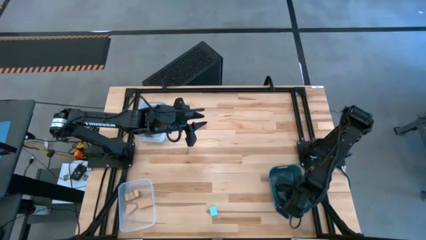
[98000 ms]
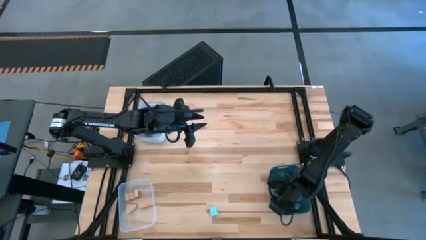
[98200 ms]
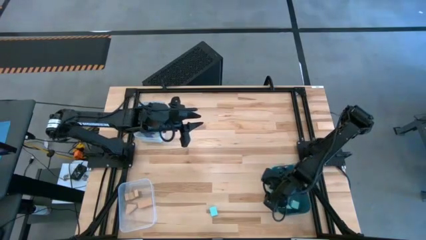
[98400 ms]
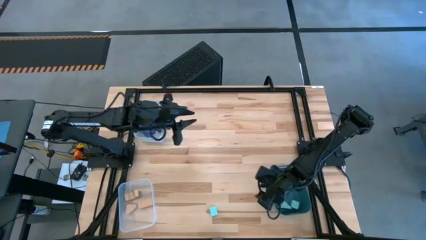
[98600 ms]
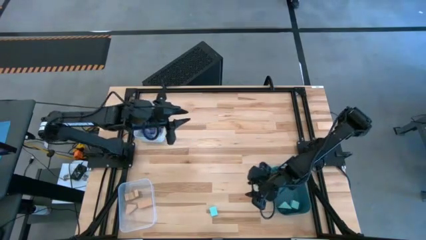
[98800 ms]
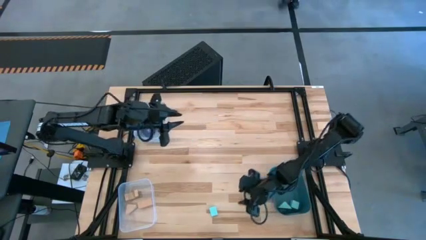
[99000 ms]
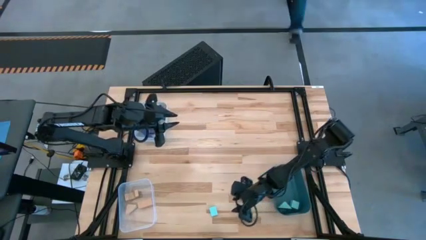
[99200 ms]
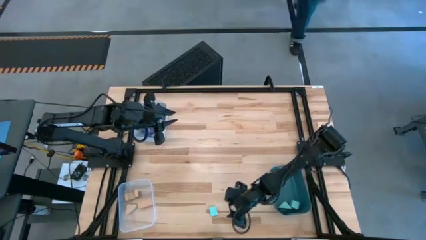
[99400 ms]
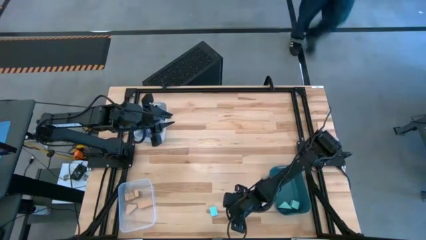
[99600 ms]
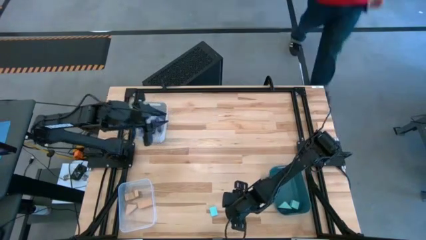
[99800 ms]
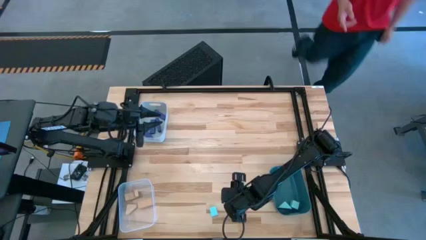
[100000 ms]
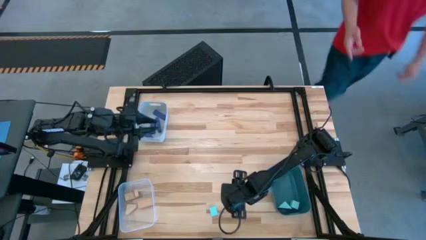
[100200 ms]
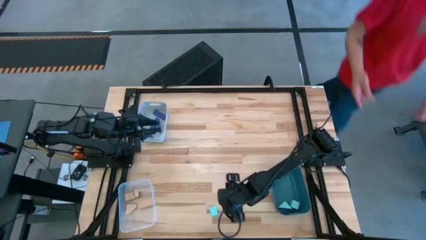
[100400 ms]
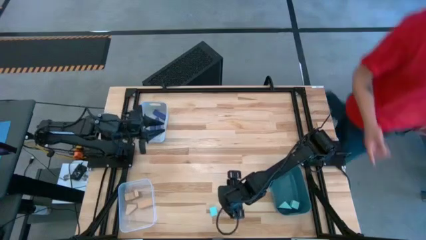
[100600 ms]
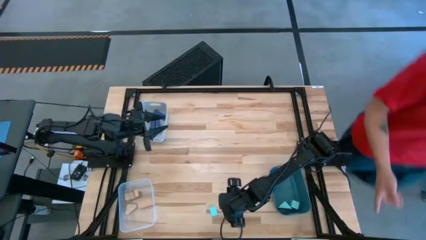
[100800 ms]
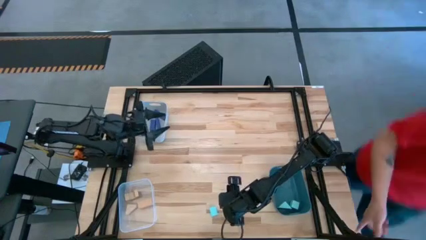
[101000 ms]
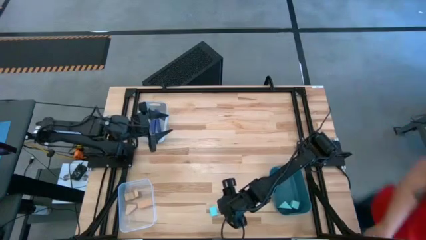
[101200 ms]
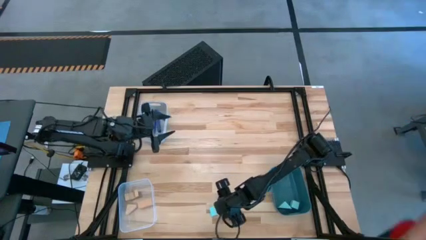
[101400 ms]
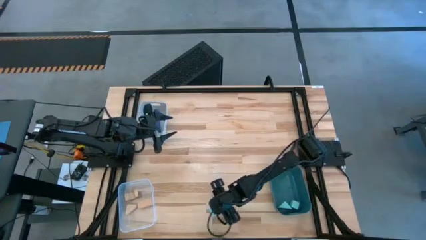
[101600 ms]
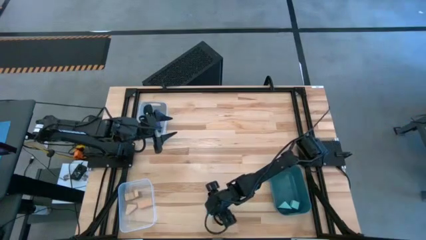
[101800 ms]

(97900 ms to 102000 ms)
Task: Sort & place blocks by color
Put the blue block into the blue bin

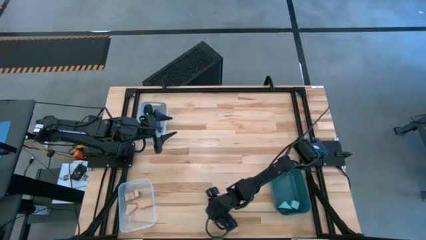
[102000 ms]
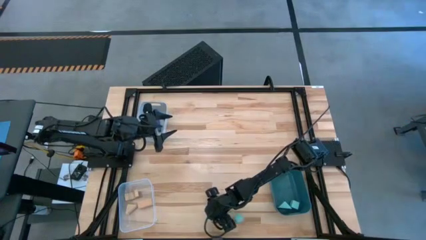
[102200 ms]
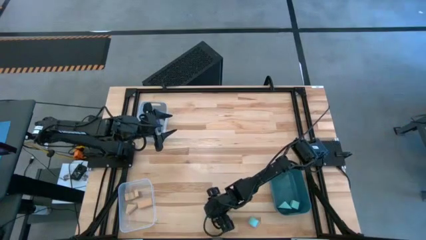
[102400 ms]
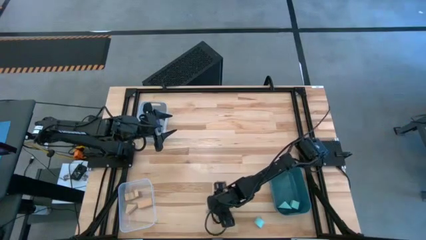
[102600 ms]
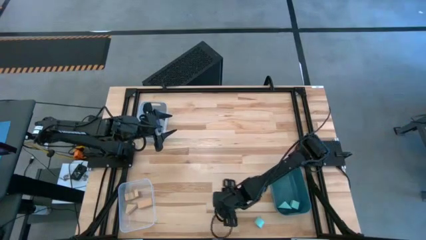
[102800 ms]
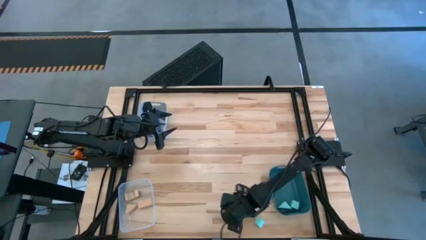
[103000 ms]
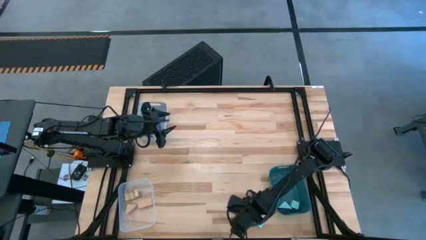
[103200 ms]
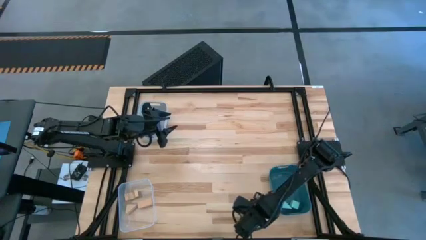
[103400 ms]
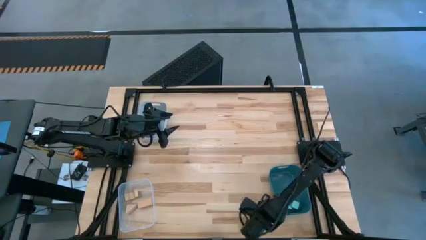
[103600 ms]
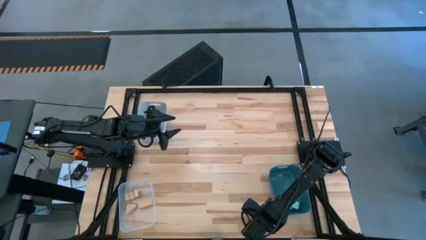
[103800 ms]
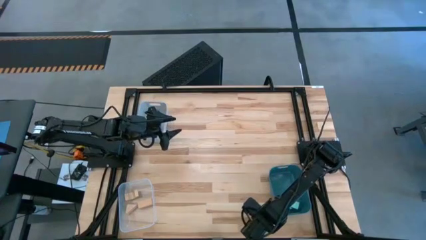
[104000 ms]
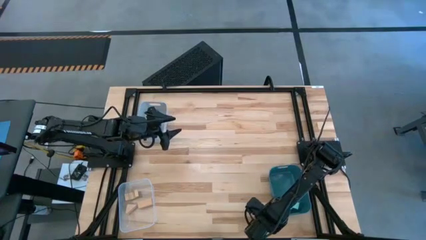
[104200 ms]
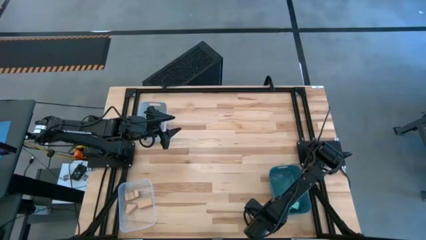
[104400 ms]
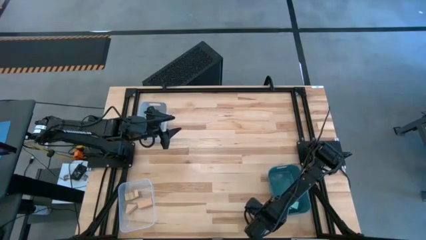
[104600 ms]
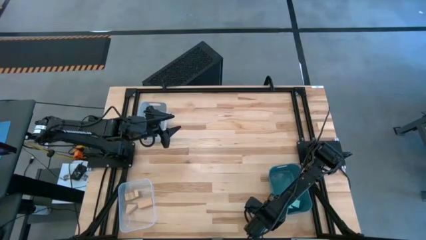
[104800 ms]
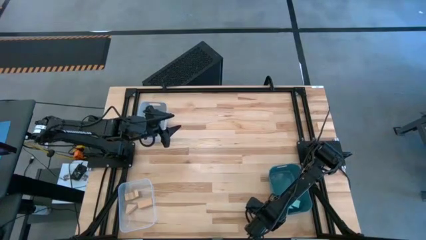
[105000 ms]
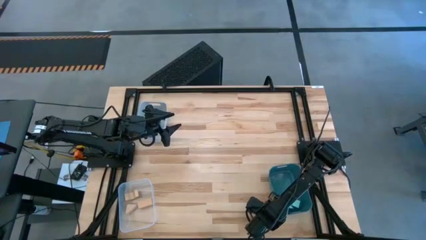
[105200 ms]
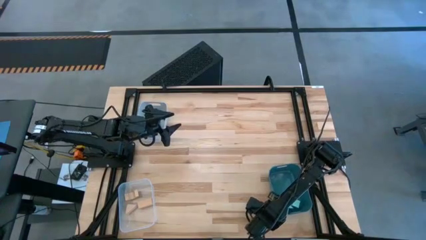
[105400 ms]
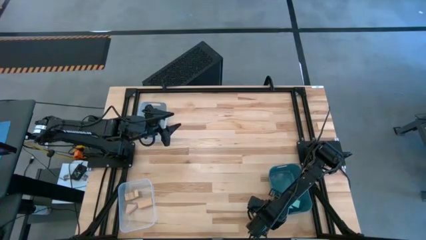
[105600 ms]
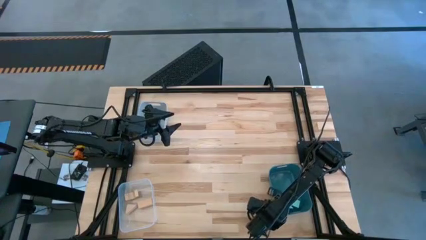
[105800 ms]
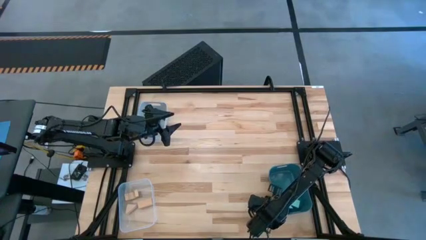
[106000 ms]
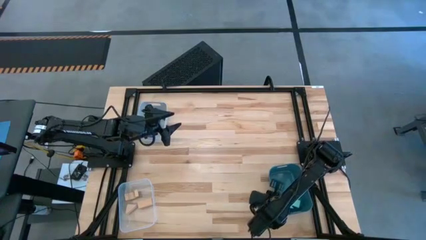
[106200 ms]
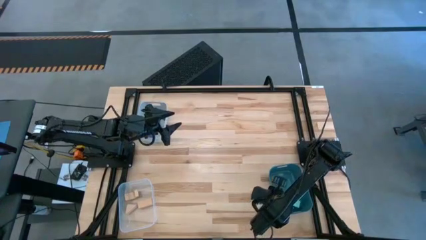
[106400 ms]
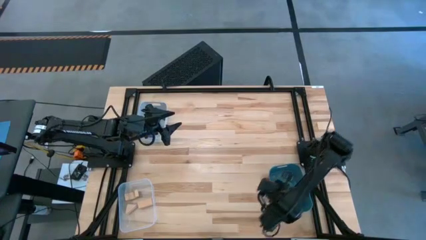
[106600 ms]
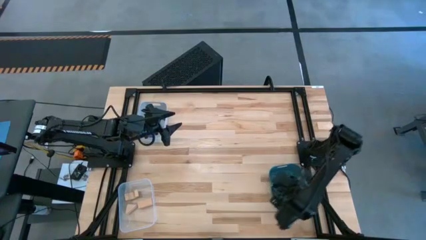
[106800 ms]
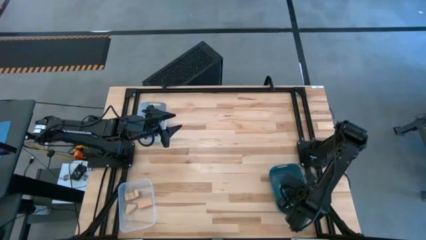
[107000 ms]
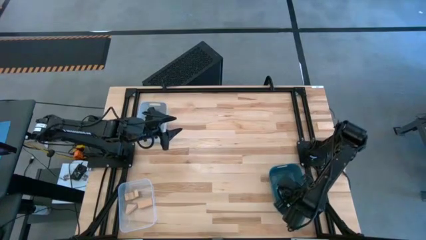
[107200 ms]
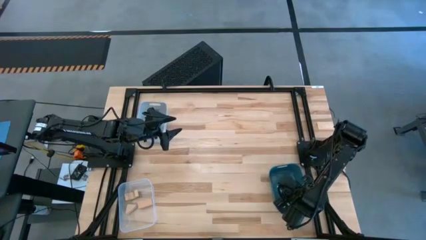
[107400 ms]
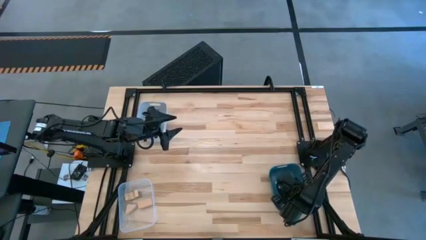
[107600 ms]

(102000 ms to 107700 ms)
Put the blue block into the blue bin

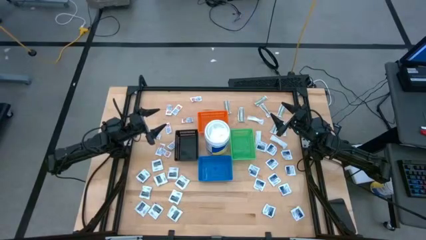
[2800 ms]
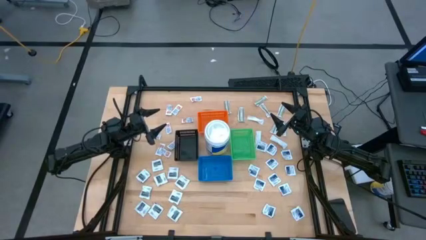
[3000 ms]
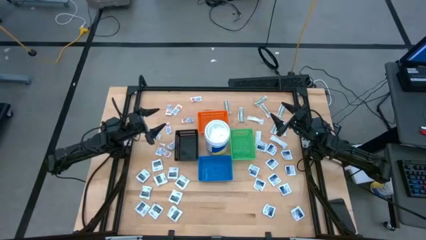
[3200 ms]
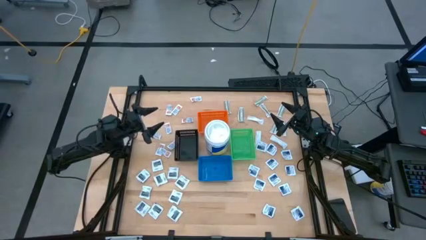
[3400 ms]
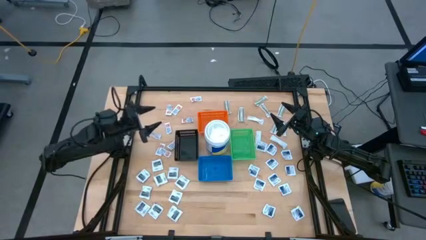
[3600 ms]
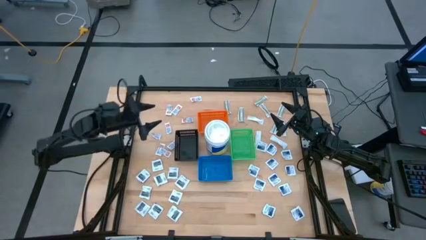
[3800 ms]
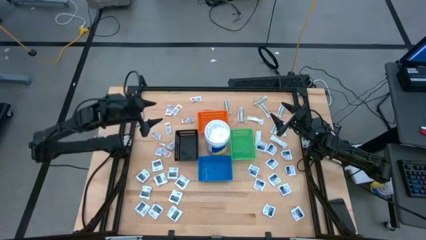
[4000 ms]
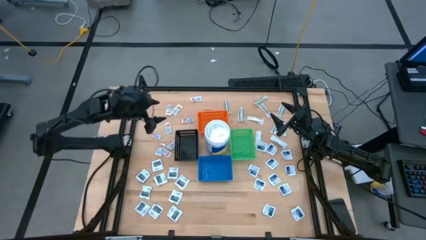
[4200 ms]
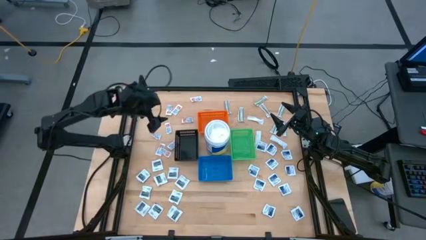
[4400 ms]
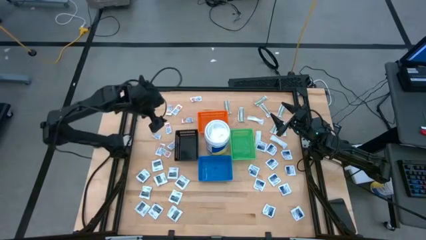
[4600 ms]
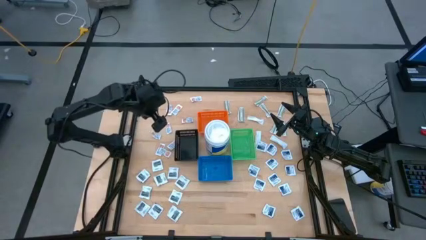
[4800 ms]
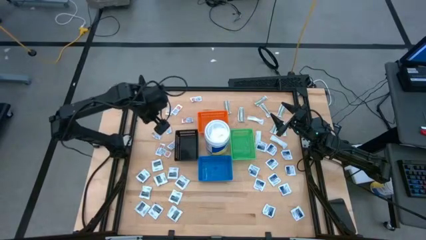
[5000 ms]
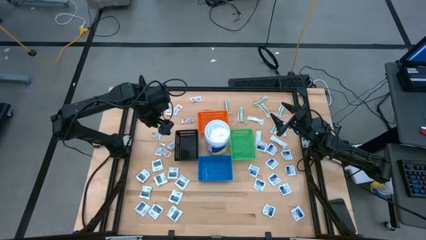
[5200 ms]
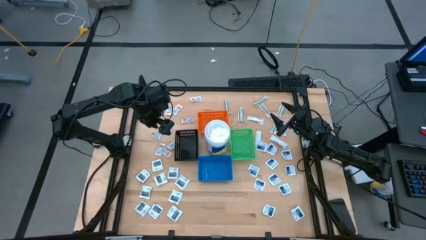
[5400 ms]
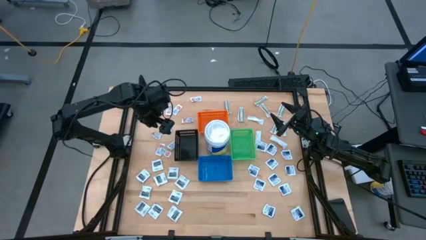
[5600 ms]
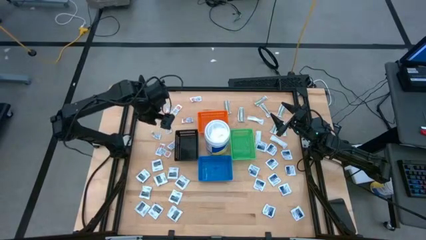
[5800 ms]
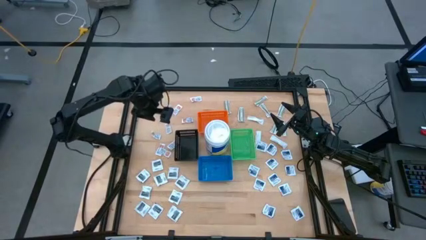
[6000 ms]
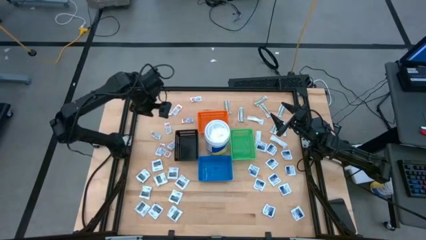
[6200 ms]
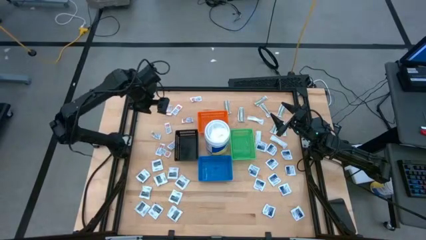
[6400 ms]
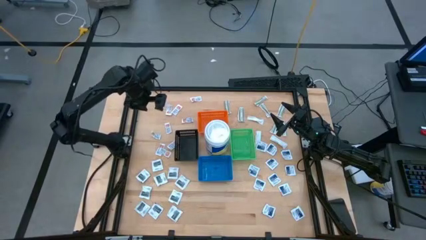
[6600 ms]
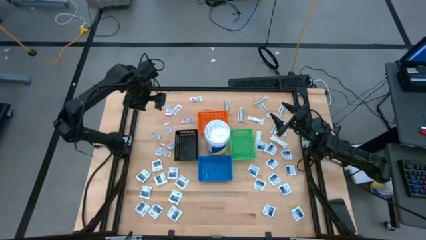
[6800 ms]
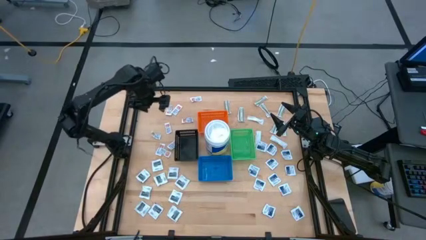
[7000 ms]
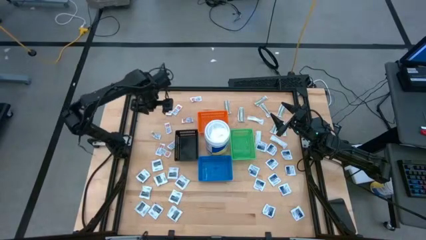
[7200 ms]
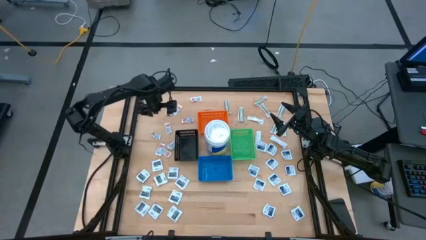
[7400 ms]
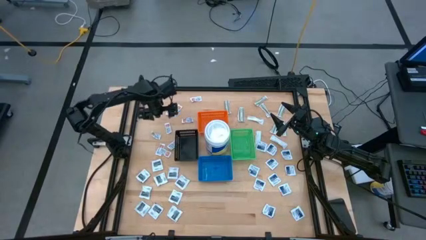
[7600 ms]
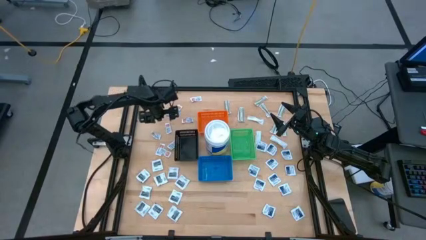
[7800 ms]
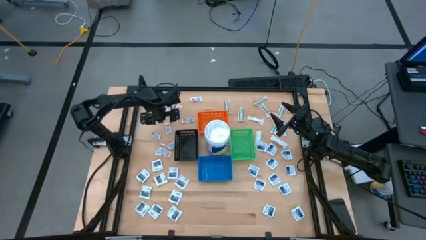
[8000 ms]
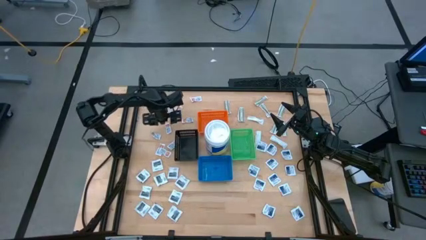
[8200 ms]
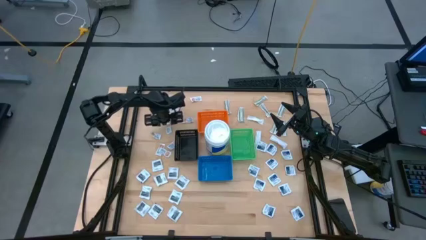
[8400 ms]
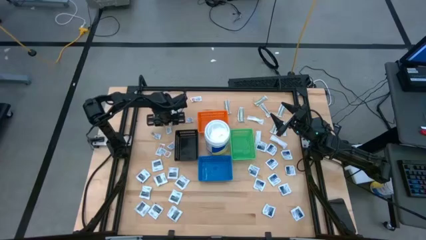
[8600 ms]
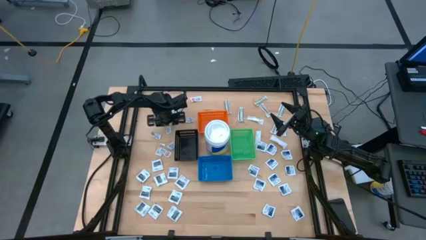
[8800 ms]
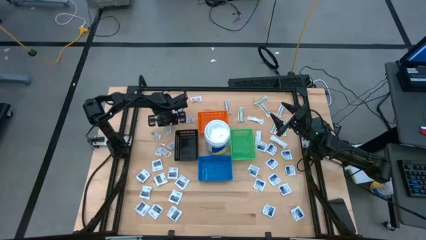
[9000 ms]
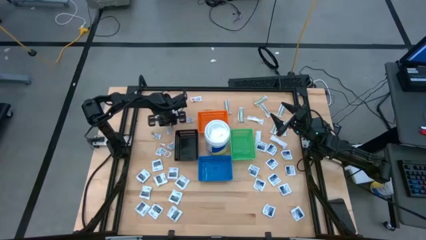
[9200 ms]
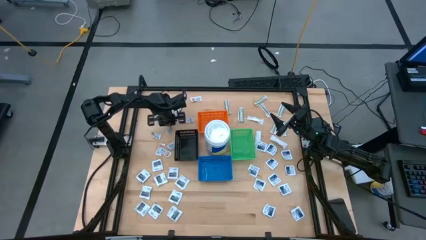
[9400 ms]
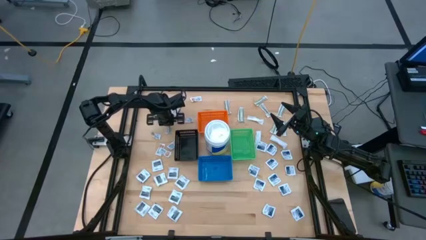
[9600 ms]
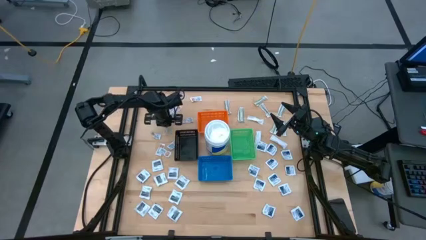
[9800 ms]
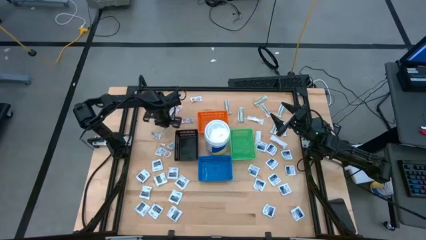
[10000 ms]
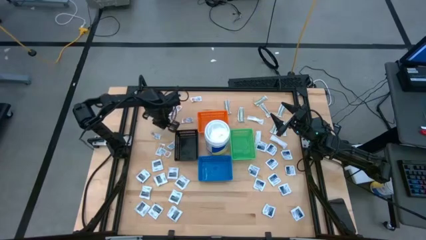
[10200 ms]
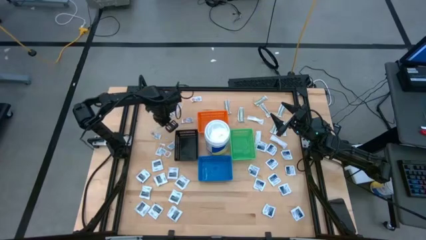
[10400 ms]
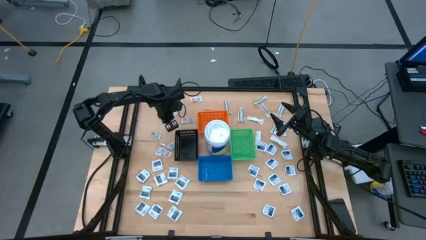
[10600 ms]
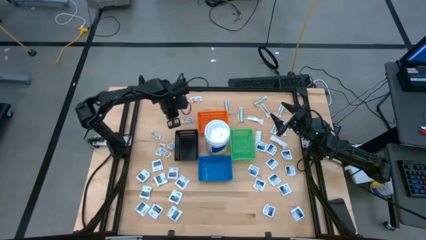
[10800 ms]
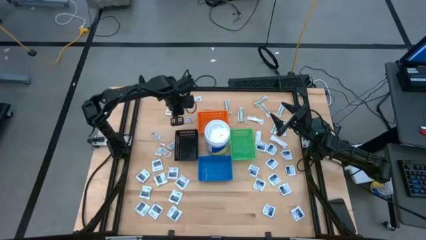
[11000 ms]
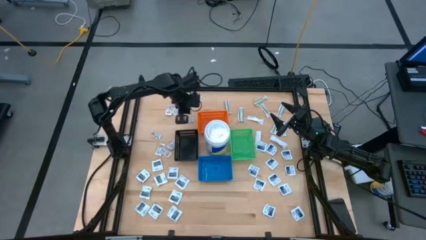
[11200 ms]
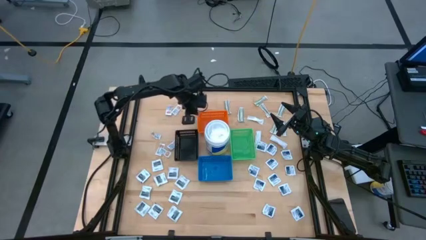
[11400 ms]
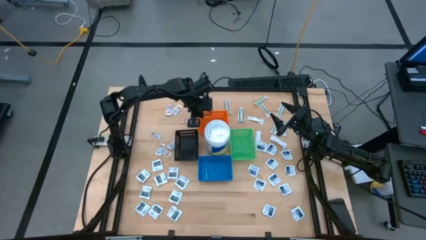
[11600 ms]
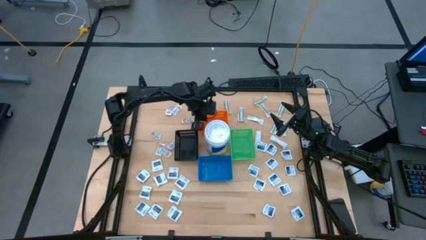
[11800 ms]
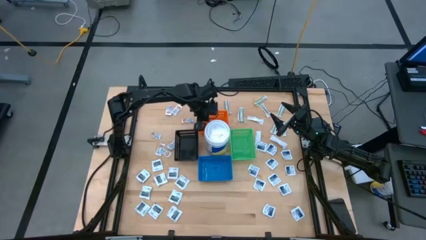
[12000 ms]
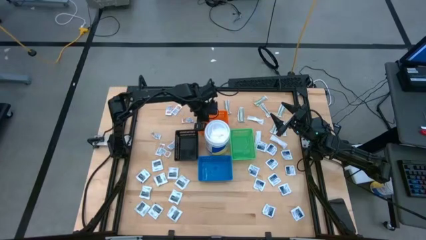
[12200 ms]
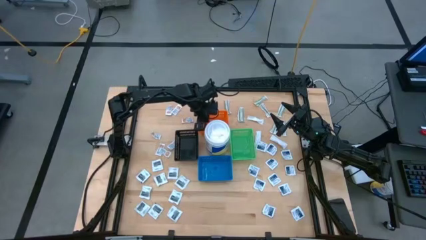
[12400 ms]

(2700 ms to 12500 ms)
Task: Pick & Place First Aid Supplies
Put the orange ointment pack into the orange bin
